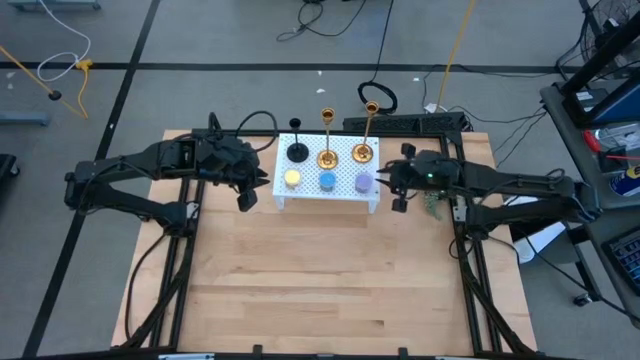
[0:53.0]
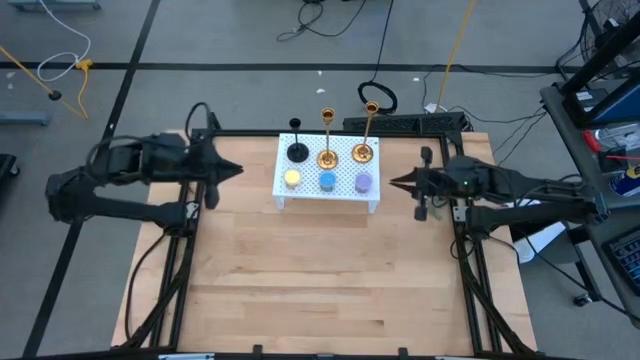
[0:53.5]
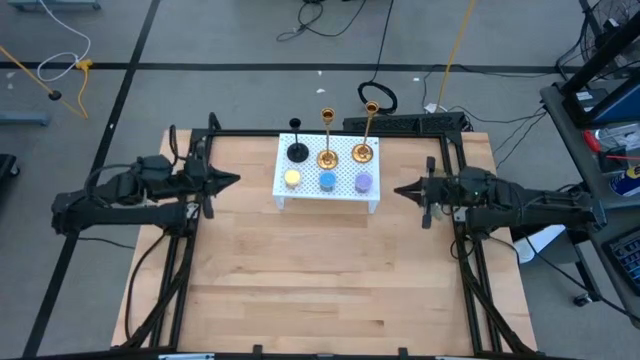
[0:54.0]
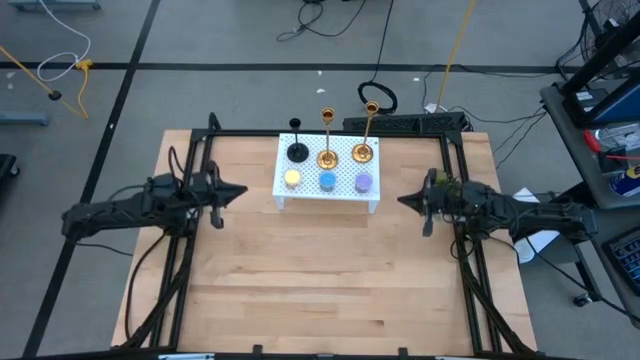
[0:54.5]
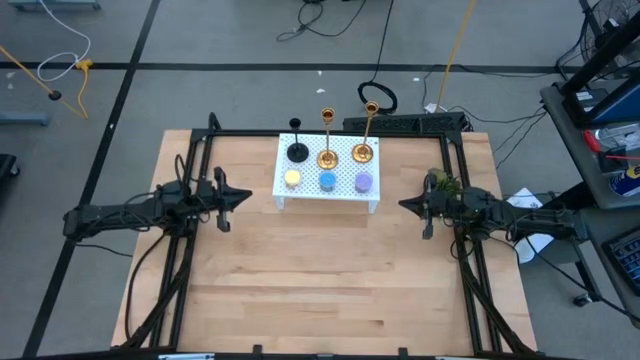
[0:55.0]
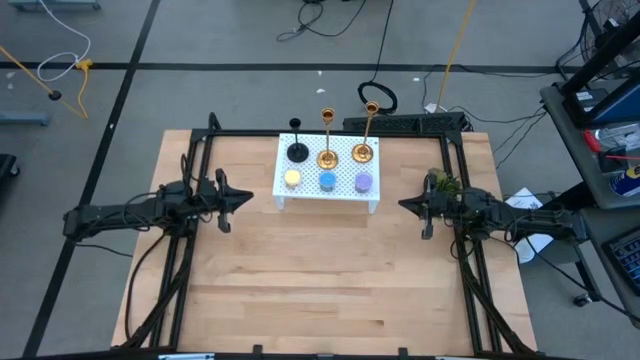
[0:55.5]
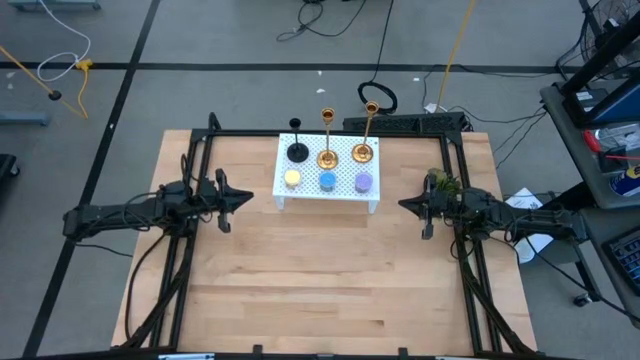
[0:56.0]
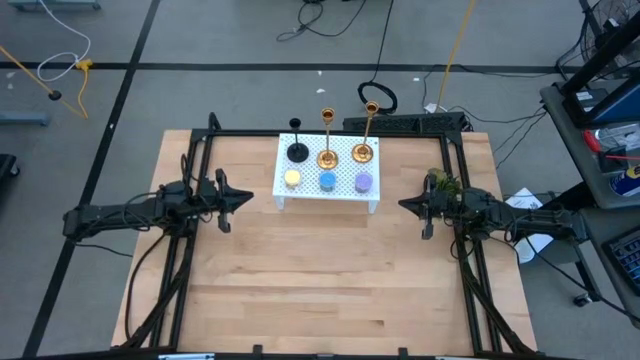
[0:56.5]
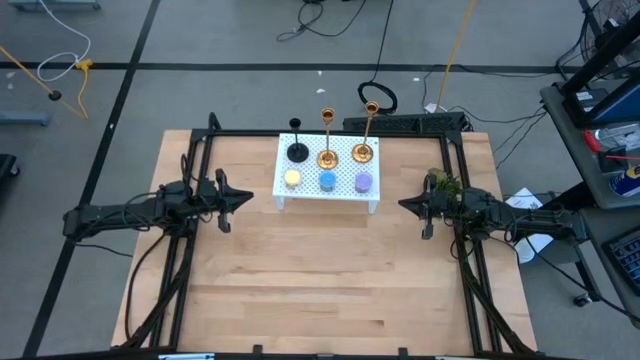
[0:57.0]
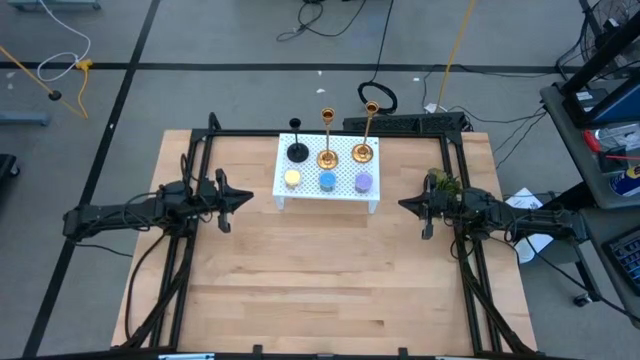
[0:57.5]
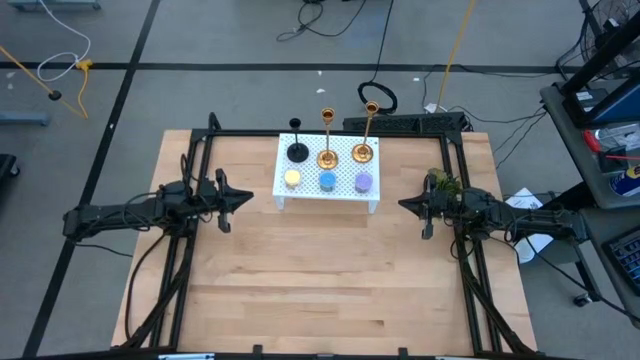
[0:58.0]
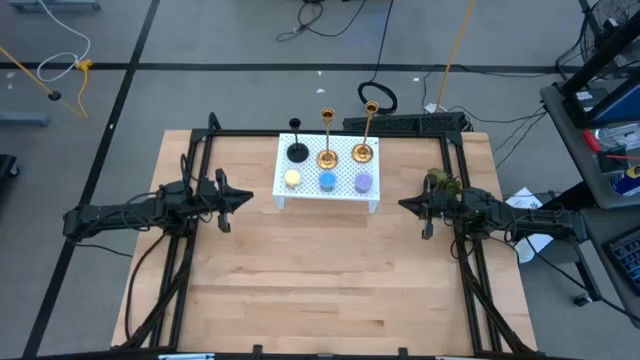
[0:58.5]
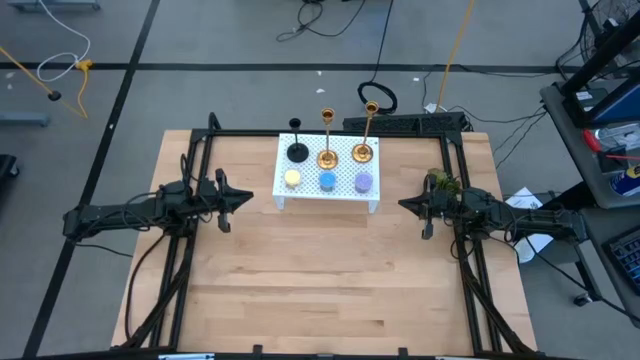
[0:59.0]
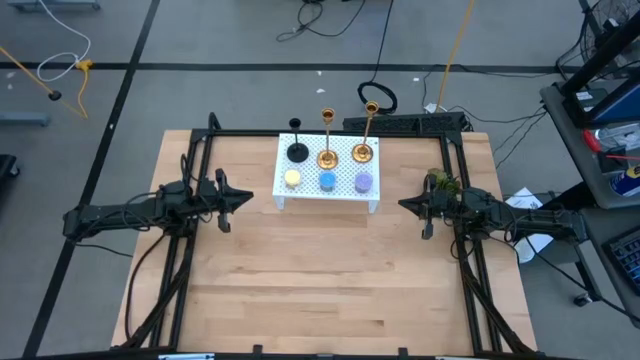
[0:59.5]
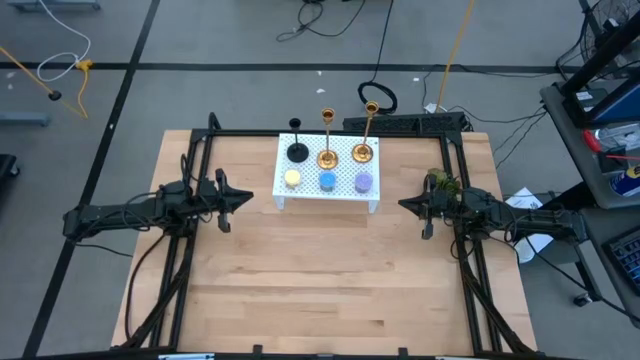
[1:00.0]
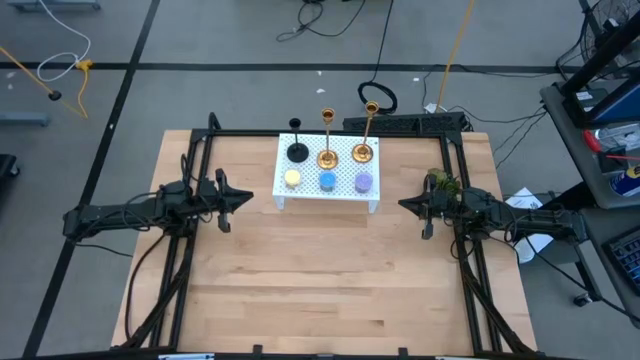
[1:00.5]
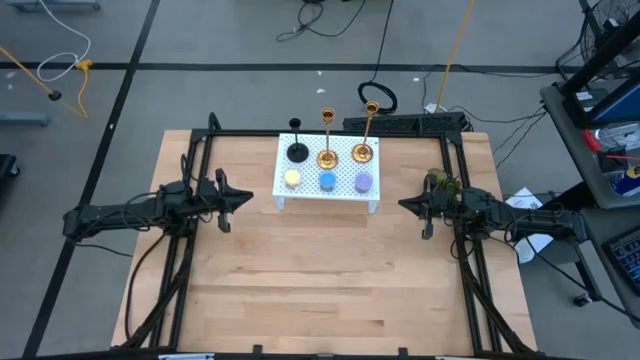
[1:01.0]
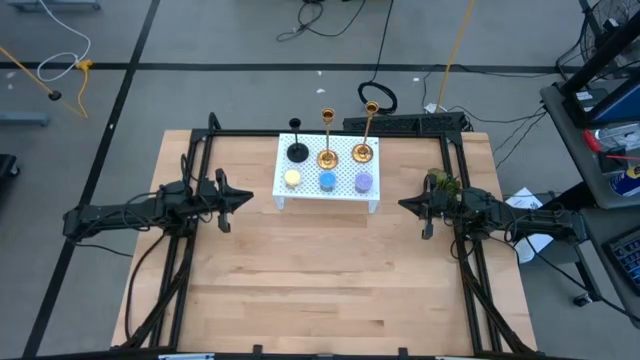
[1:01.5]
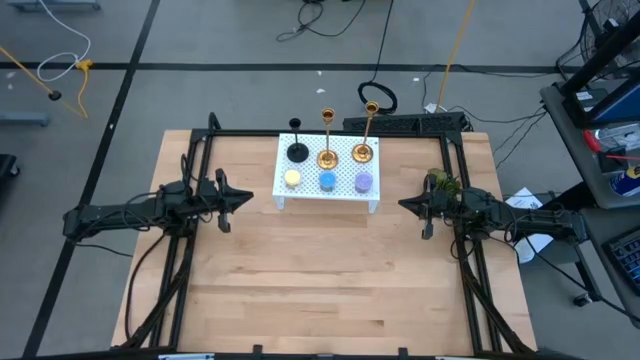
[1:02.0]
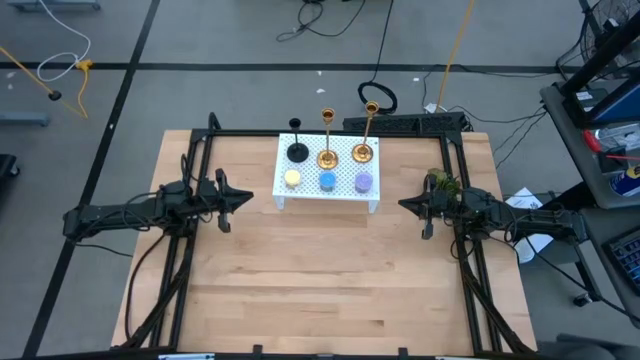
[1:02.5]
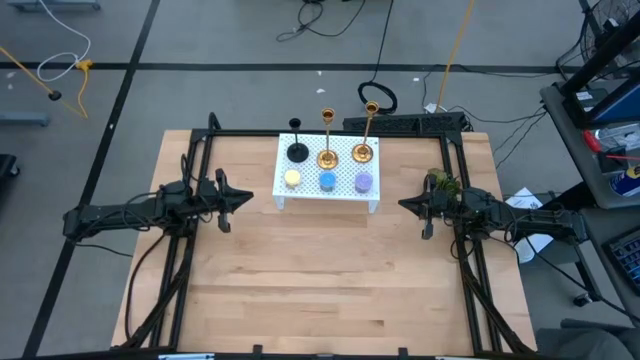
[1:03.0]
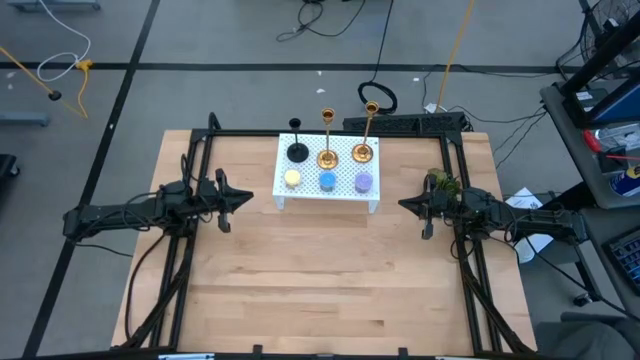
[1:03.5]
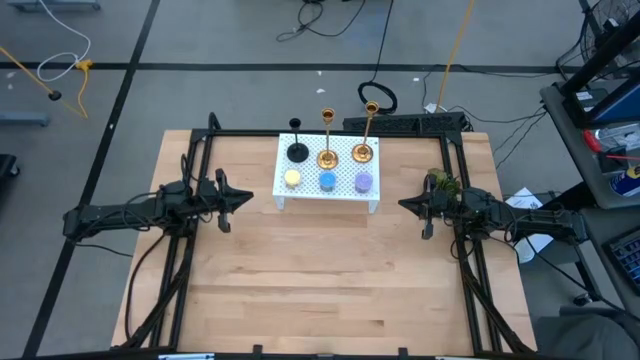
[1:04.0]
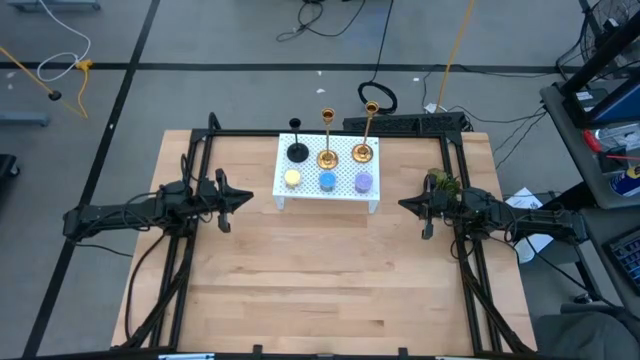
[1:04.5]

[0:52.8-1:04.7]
Task: Pick & Place candle stick holders
Return to Home Position

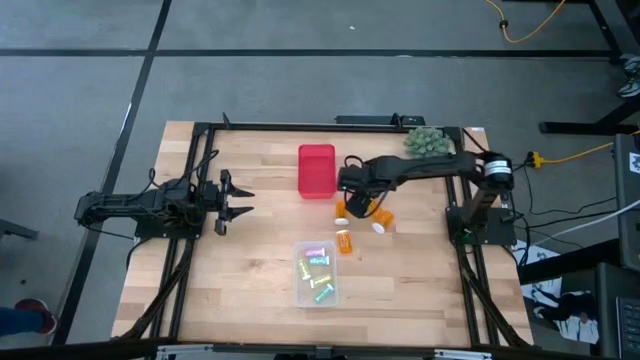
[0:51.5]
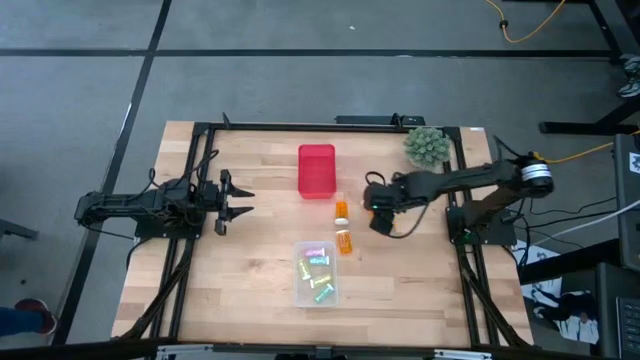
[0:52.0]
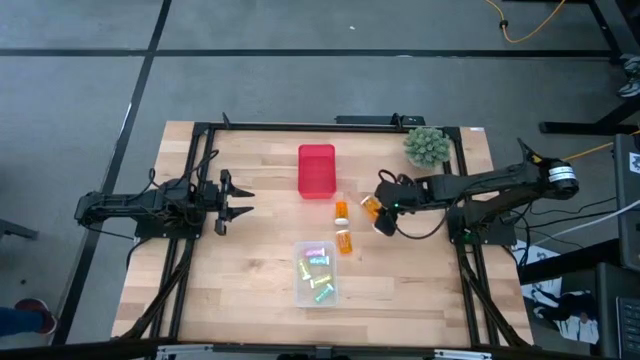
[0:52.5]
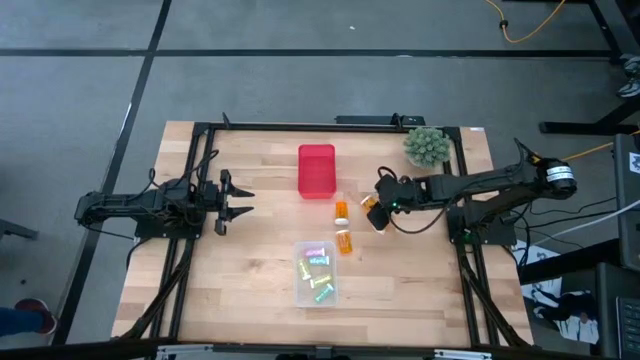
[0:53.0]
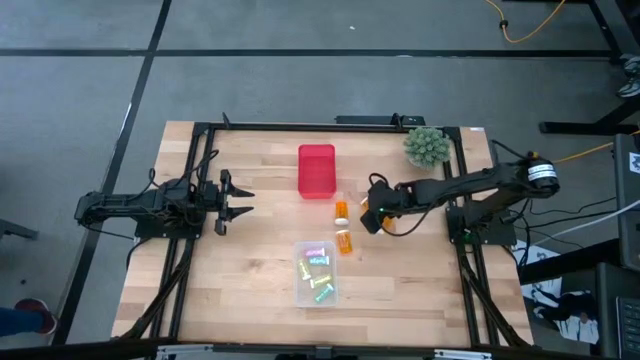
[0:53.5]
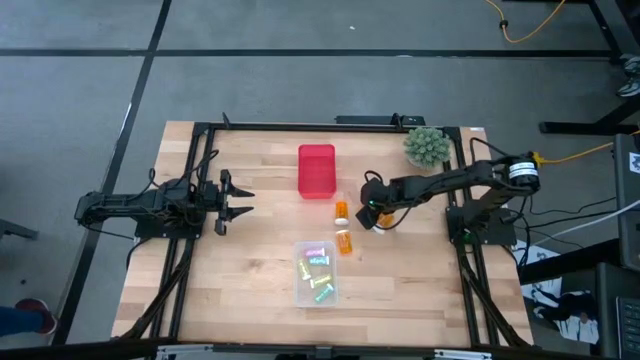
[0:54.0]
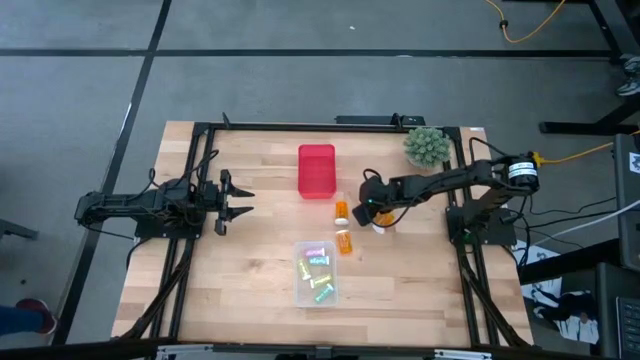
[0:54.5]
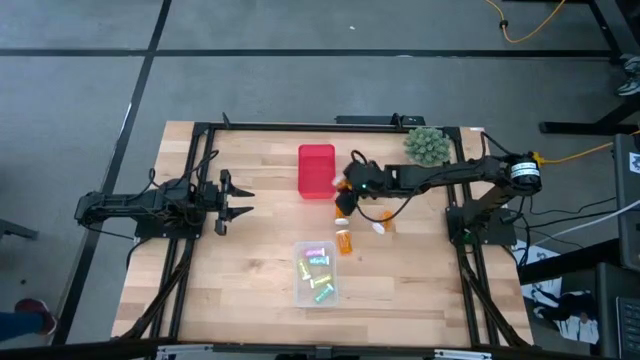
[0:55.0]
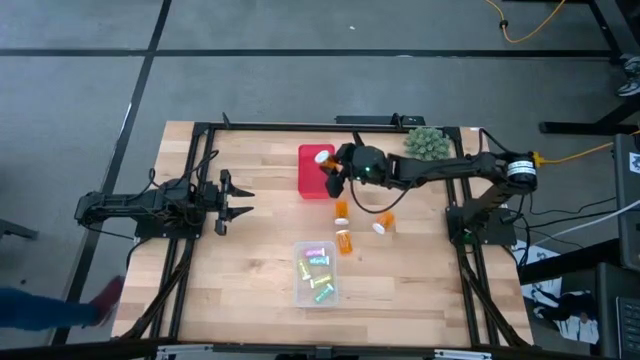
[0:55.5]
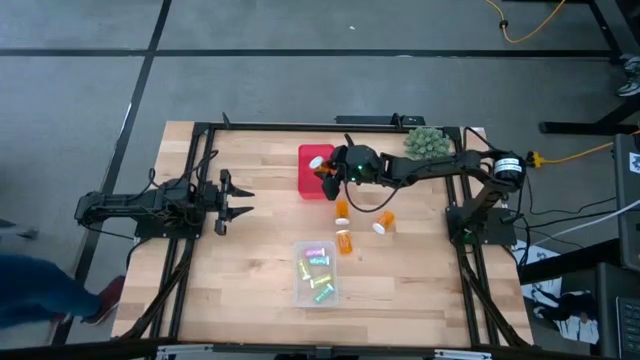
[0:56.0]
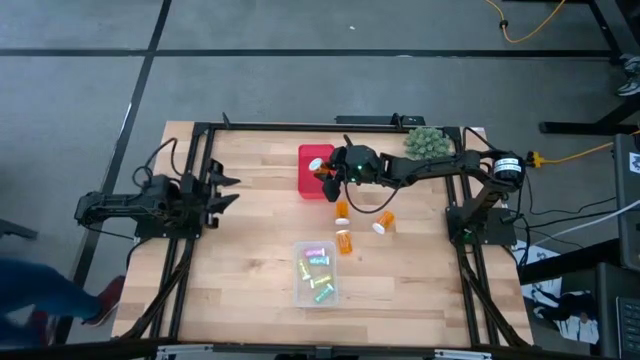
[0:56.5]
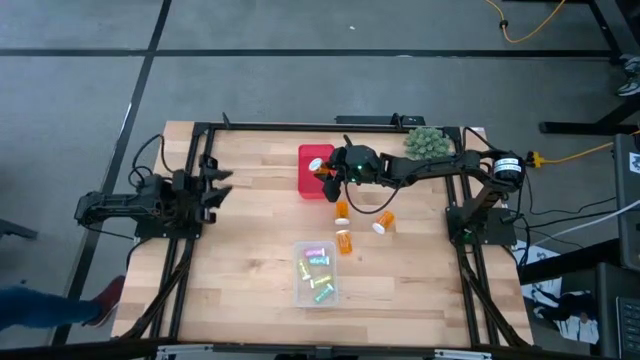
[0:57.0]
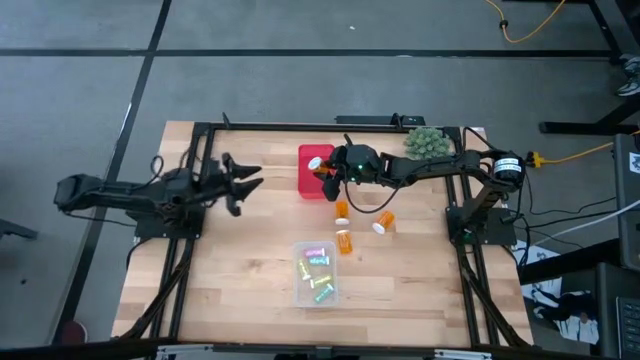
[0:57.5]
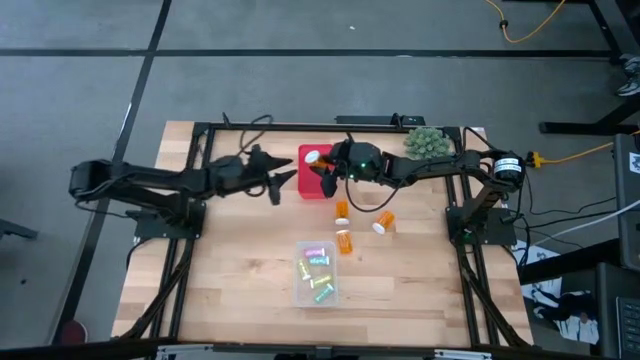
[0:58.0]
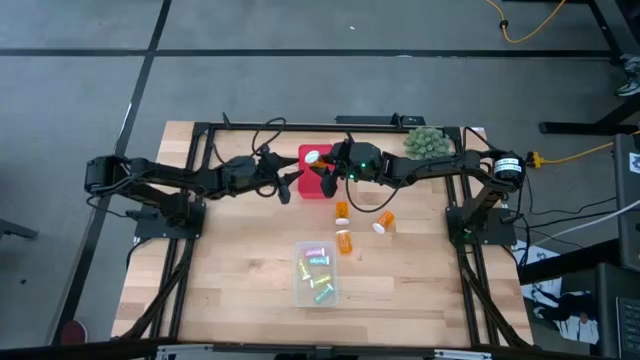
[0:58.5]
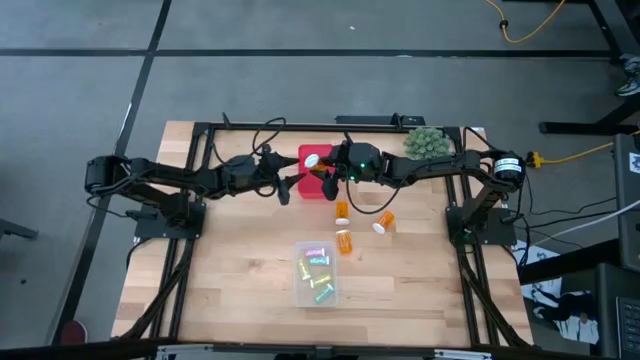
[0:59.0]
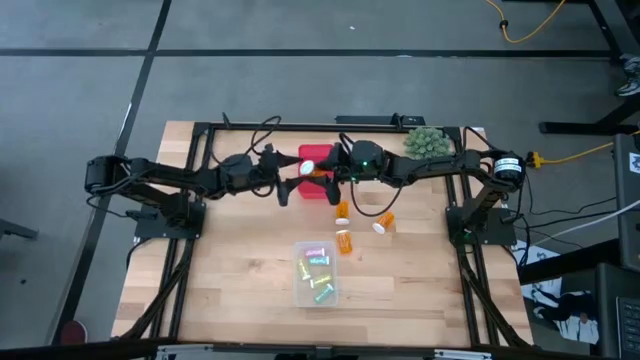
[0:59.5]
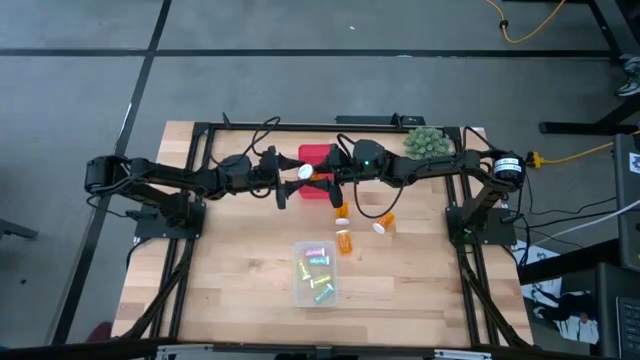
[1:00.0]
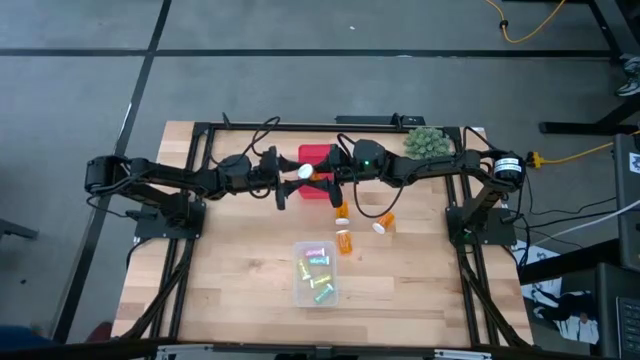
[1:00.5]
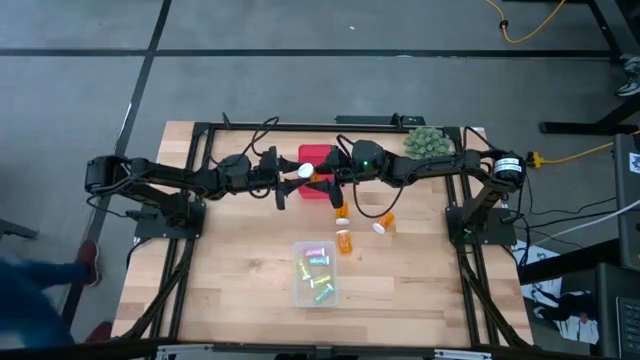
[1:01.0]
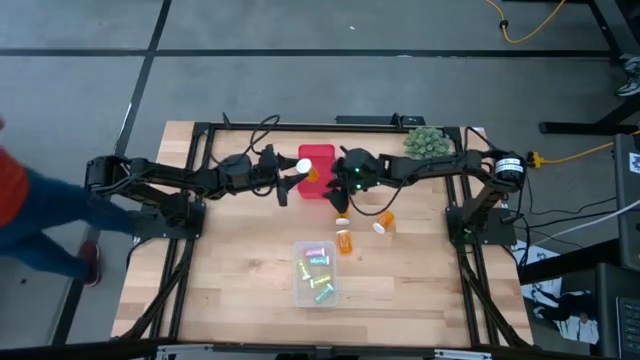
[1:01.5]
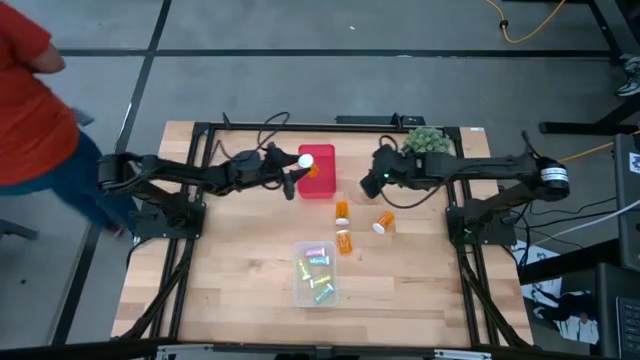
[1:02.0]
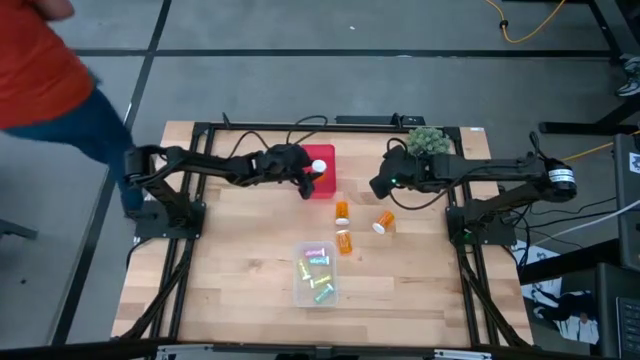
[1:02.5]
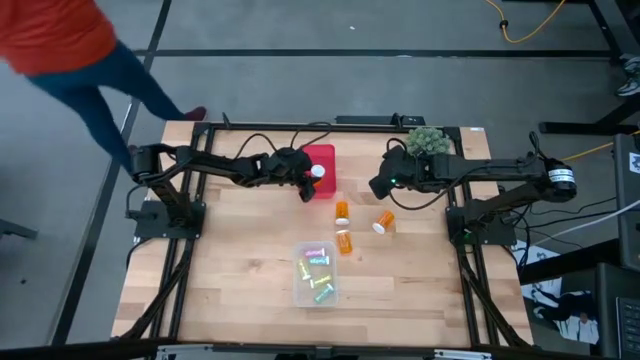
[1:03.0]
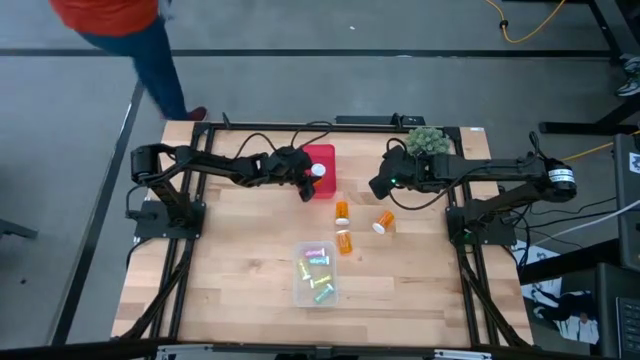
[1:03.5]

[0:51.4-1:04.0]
Task: Pick and place medicine bottles into bin by pill shape (circle, oval)
Put the large orange pill bottle into the red bin
